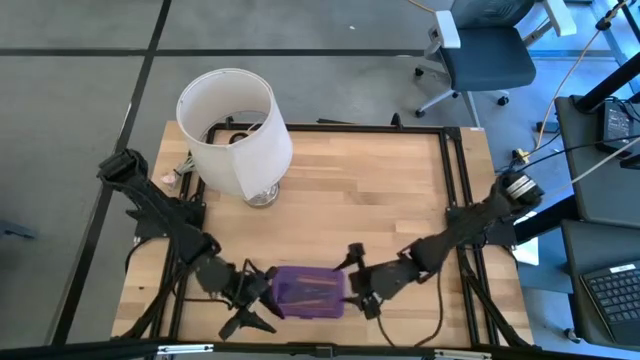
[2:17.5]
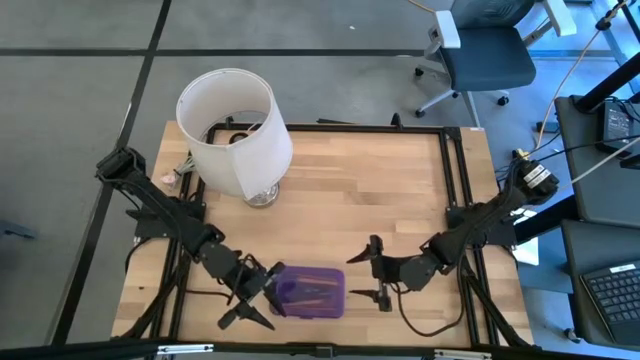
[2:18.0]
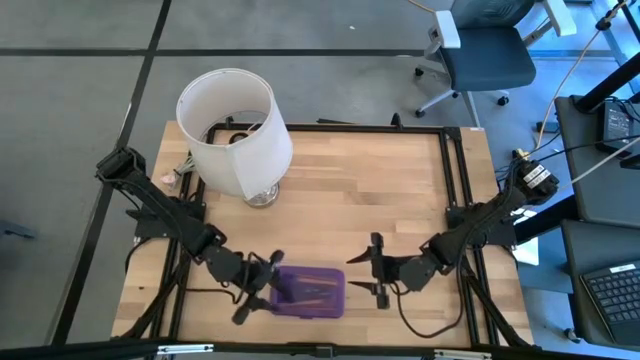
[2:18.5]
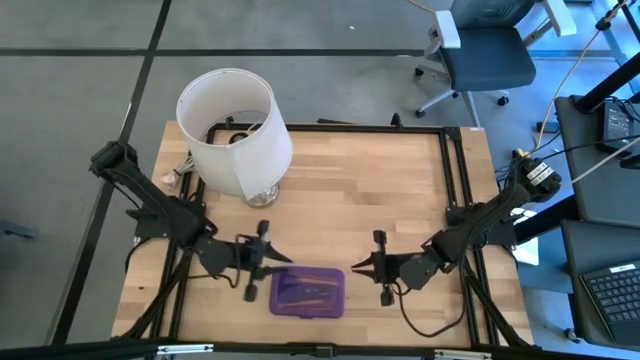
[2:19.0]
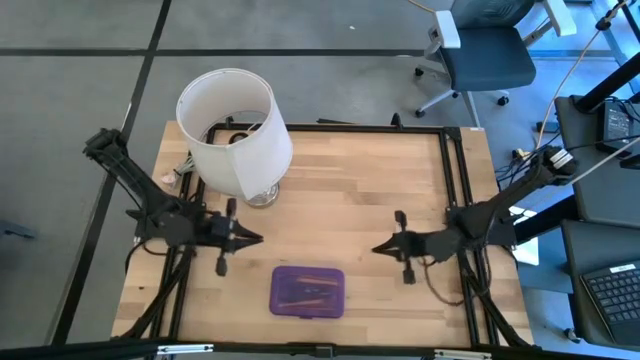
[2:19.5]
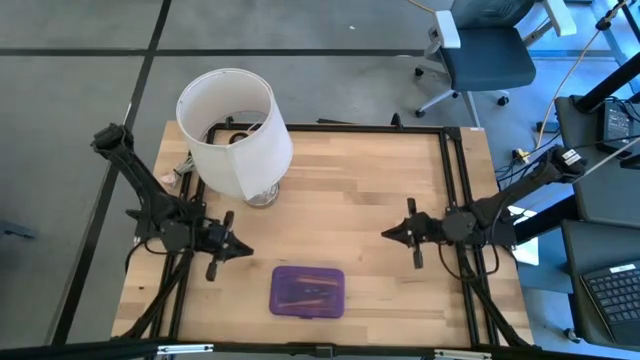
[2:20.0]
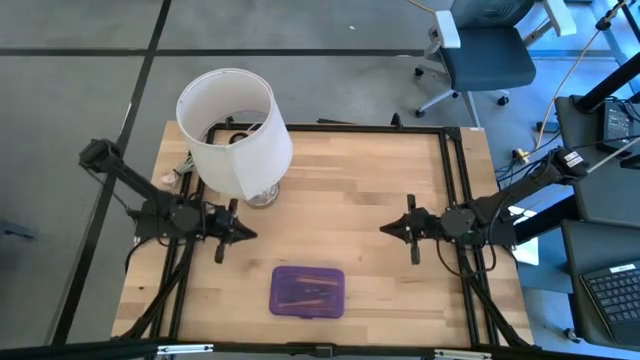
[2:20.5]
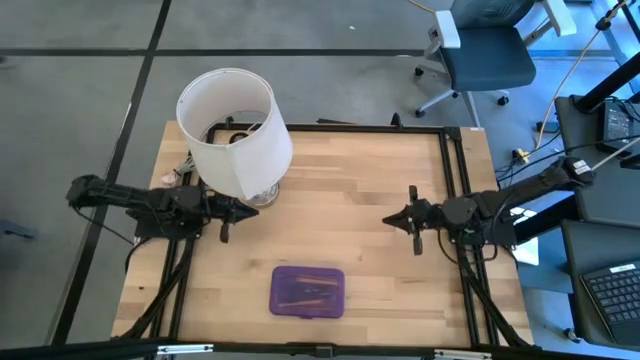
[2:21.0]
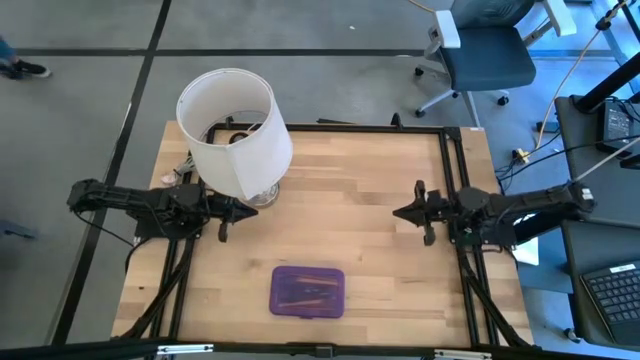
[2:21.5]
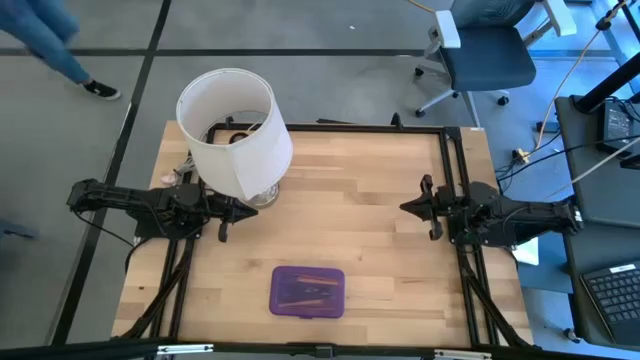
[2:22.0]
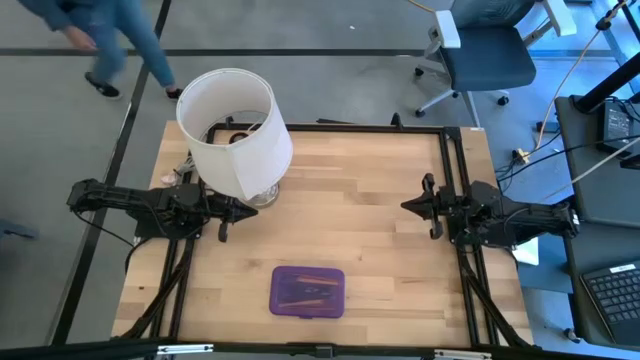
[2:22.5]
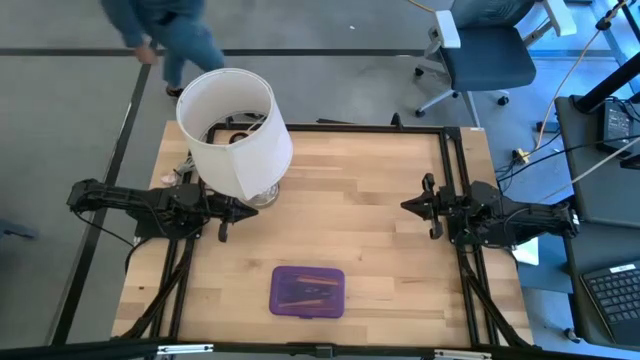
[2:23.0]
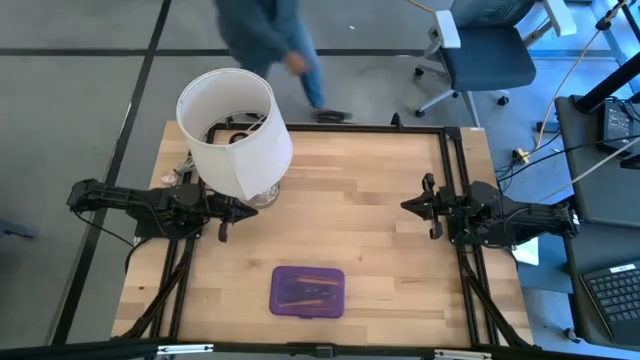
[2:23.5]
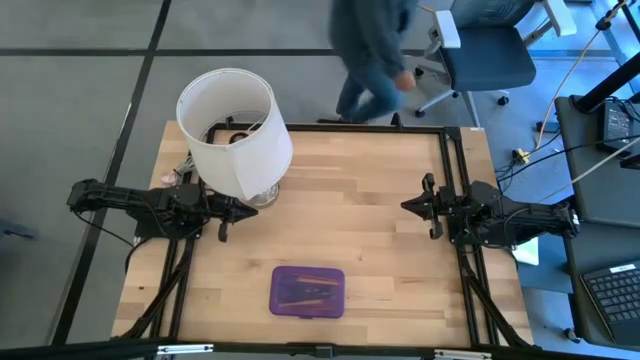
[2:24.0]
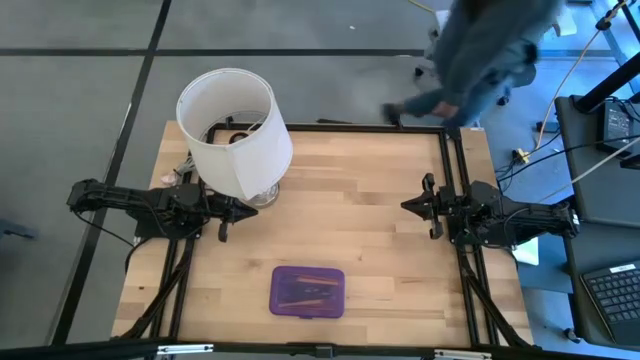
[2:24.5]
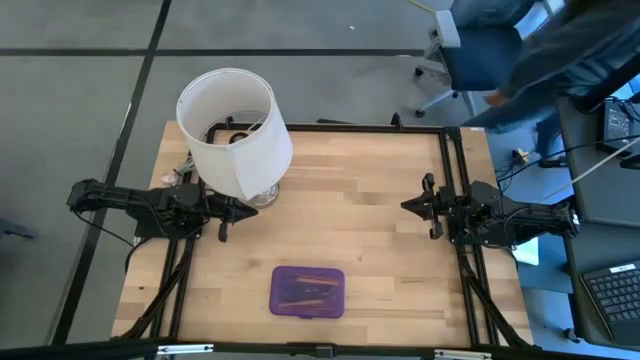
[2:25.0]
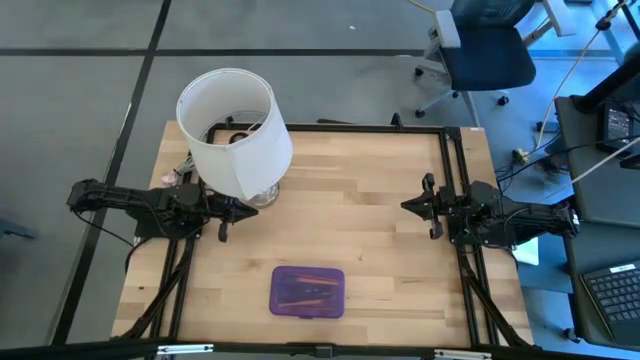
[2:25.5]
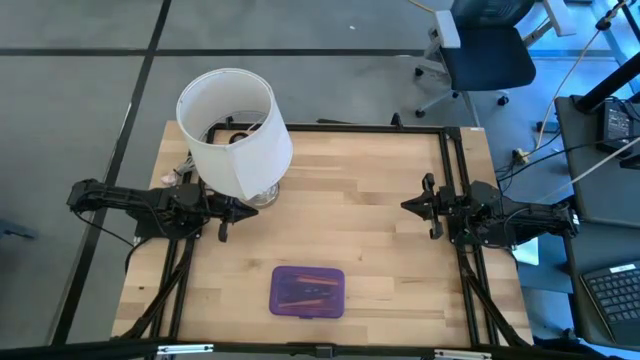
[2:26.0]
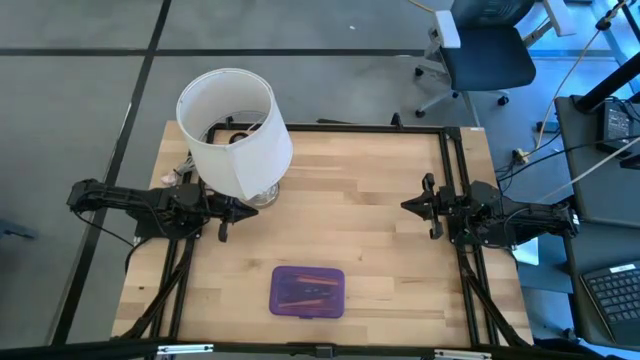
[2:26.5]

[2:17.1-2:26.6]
Task: Pick & place school supplies into a supply box
Return to Home Position

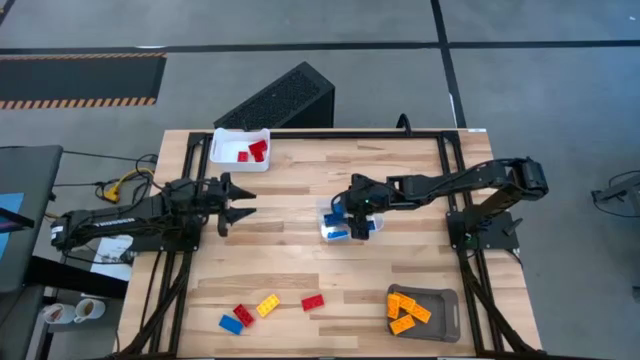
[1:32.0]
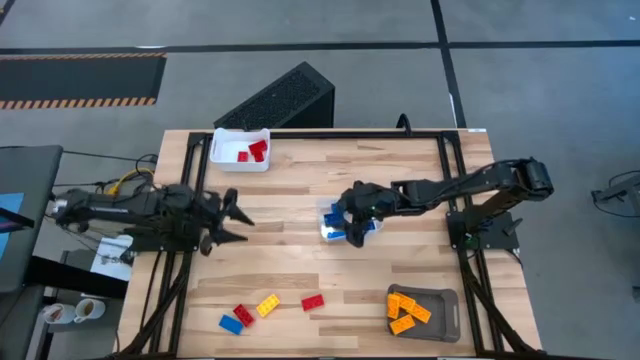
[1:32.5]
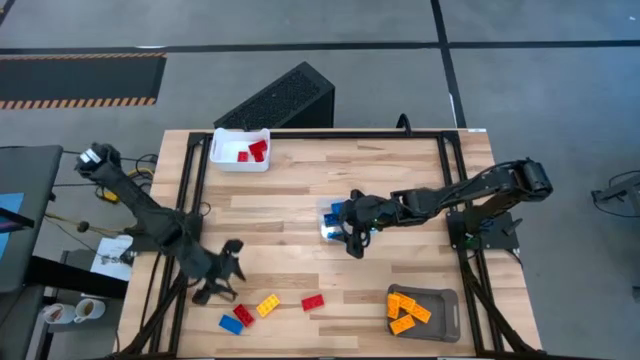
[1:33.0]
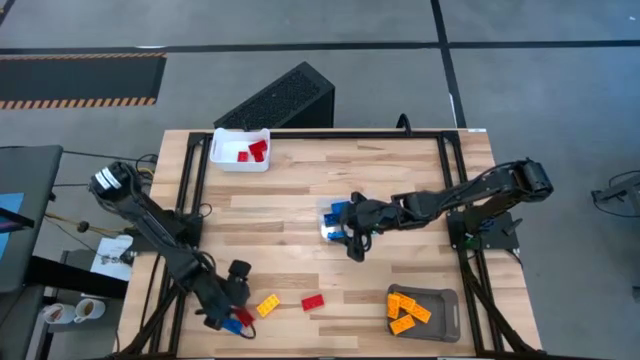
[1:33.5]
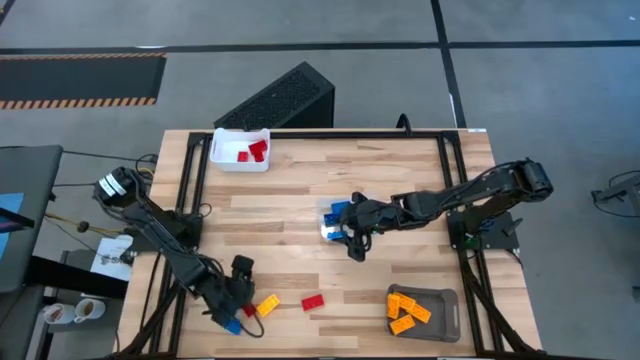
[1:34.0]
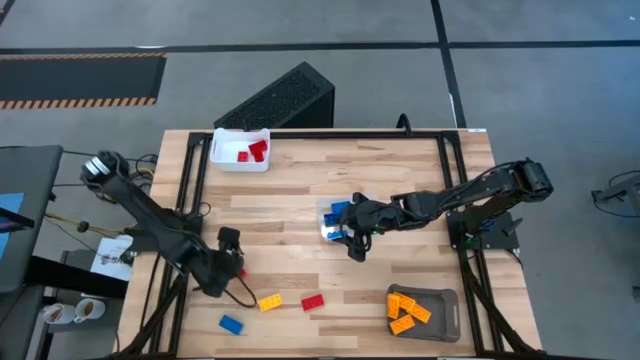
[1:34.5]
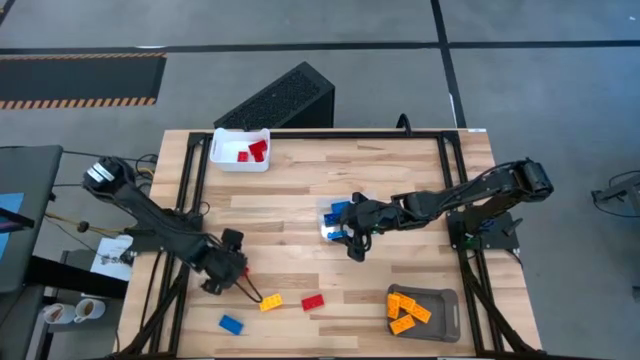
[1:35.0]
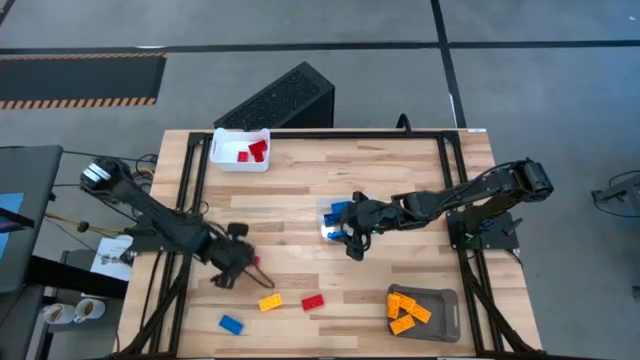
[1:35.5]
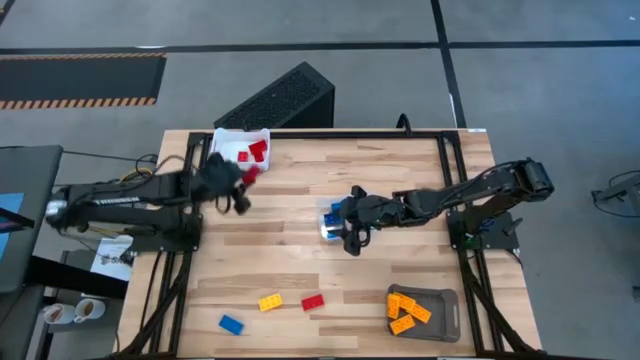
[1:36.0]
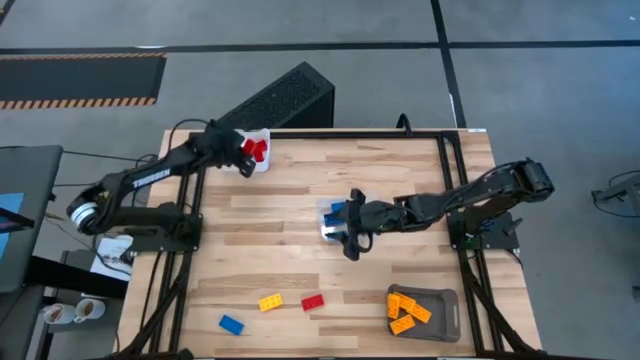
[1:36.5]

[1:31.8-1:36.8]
Task: Sort & place blocks by color
Put the red game piece into the white bin

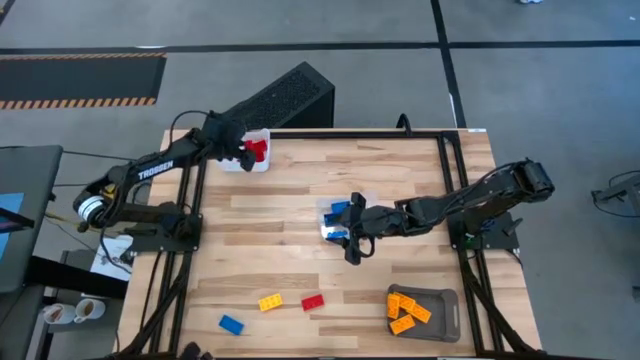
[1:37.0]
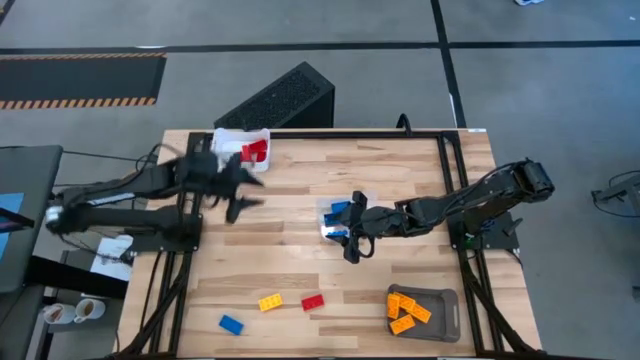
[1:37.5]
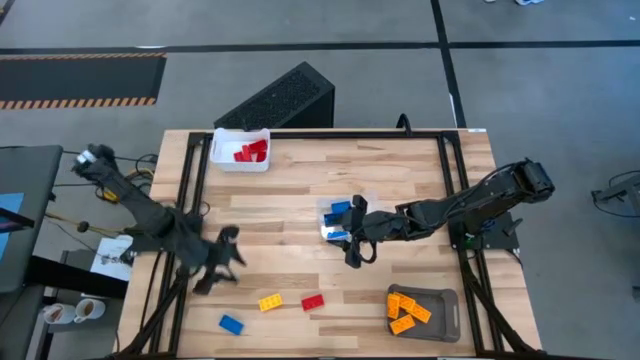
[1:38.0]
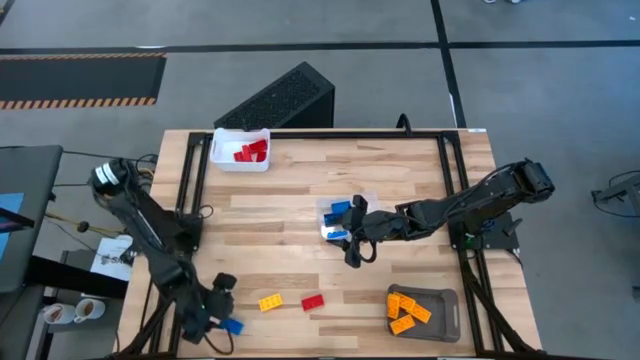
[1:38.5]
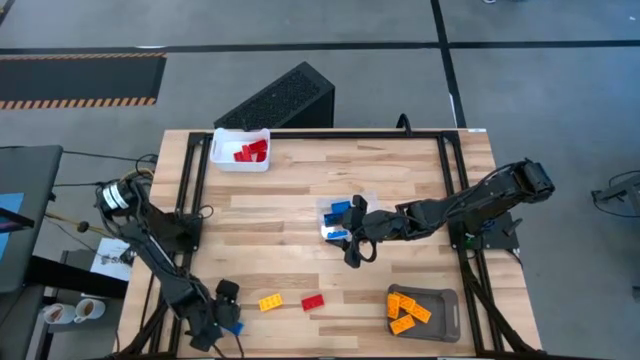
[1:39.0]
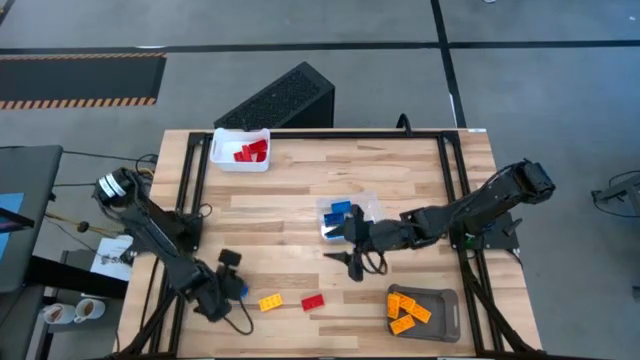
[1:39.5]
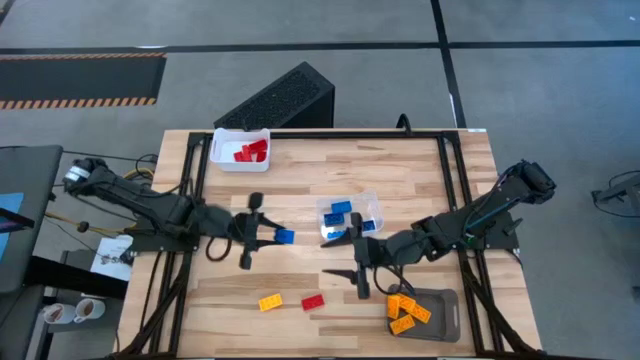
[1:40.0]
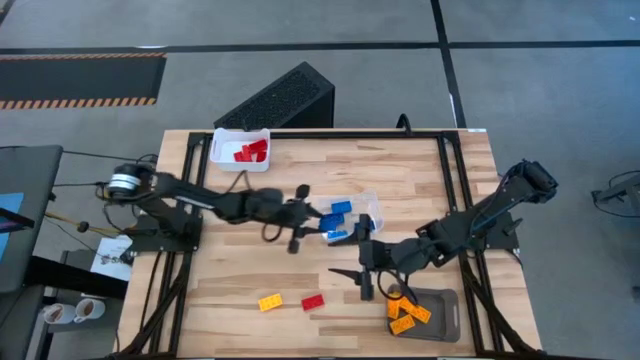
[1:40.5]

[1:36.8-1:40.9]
Put the blue game piece into the transparent bin

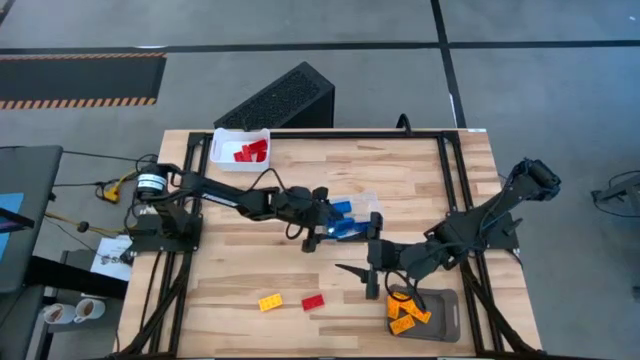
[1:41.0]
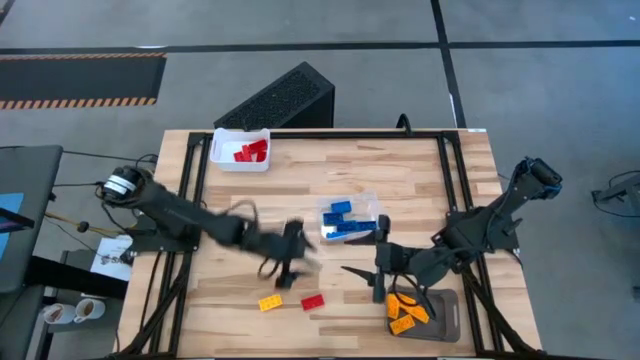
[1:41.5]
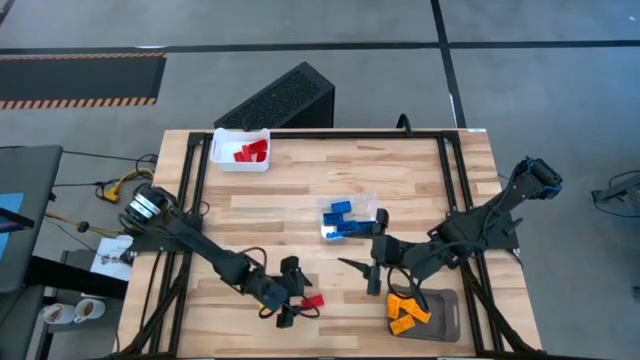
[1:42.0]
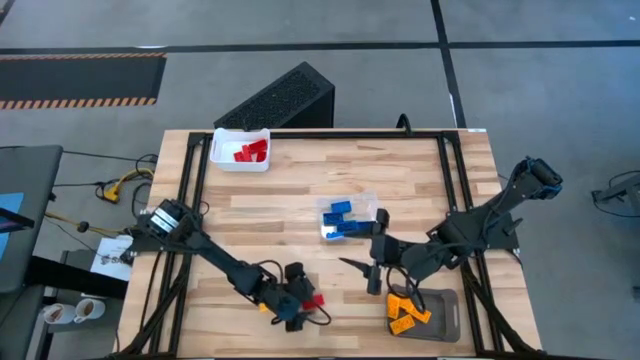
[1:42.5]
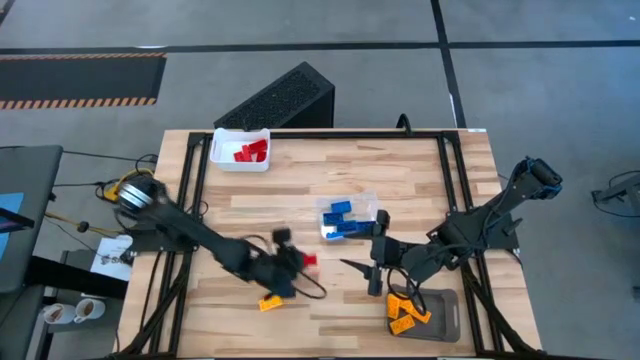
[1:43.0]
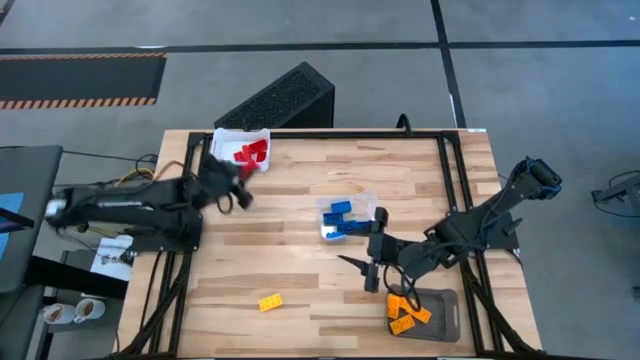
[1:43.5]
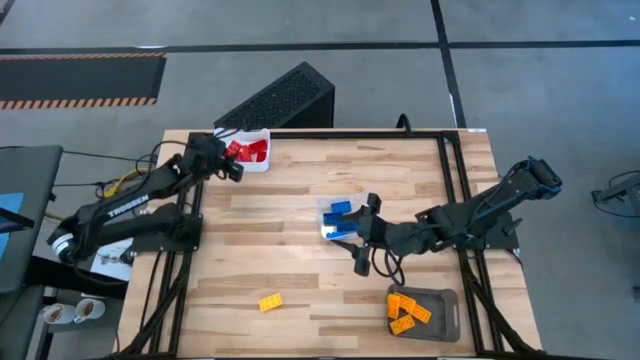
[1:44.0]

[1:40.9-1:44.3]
Put the red game piece into the white bin
